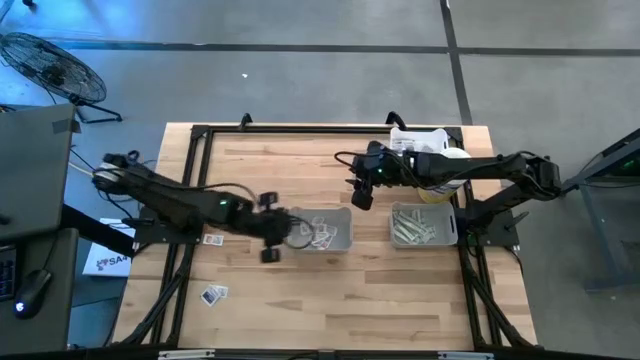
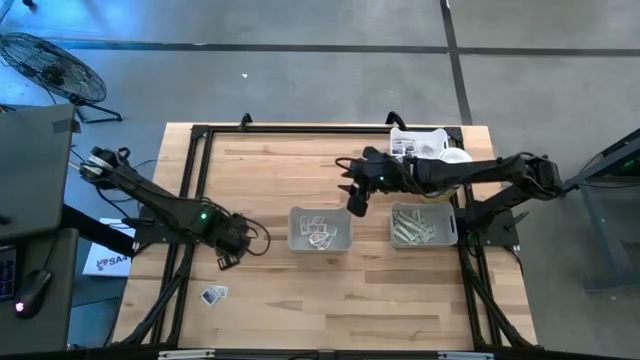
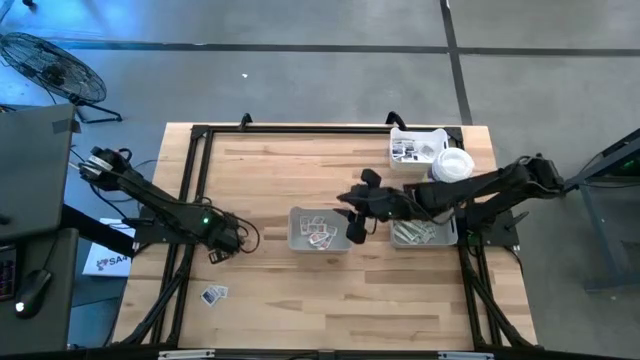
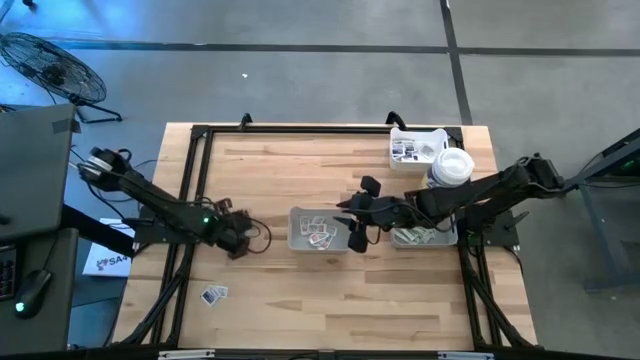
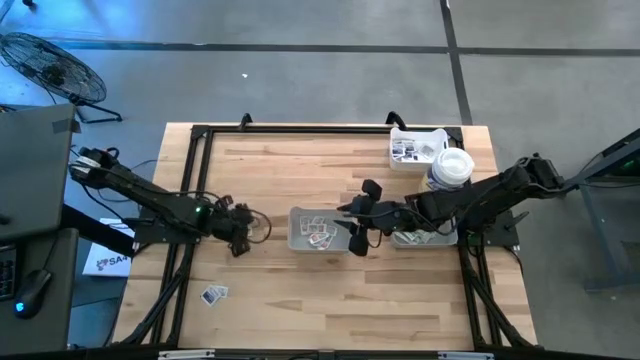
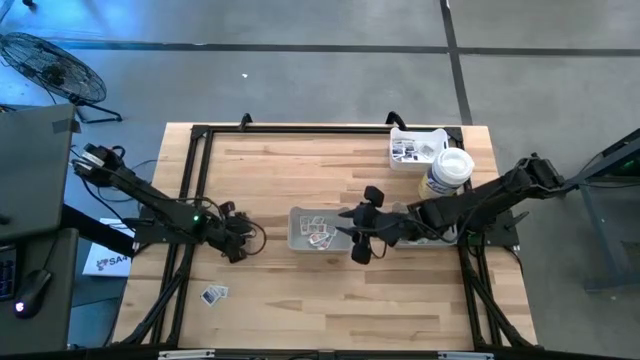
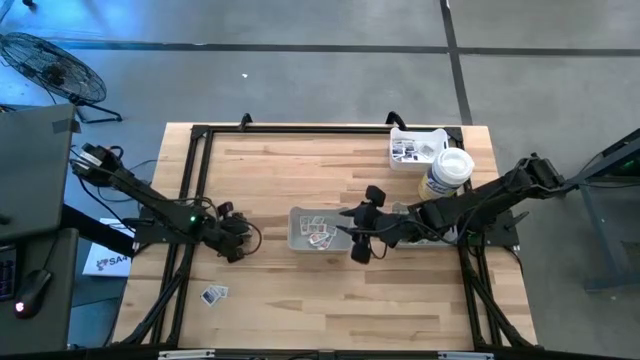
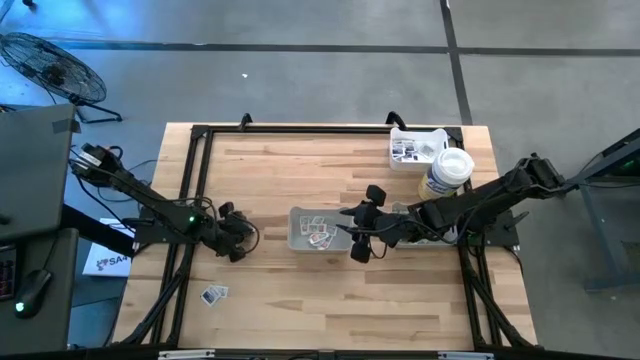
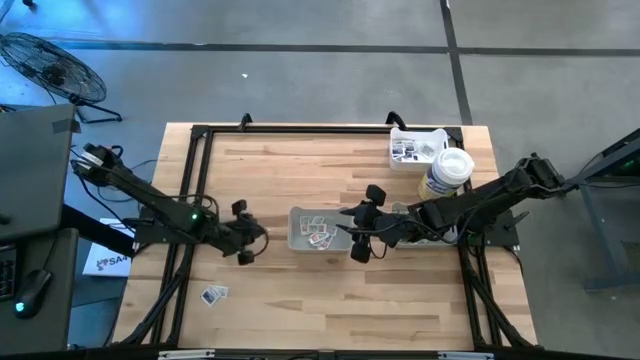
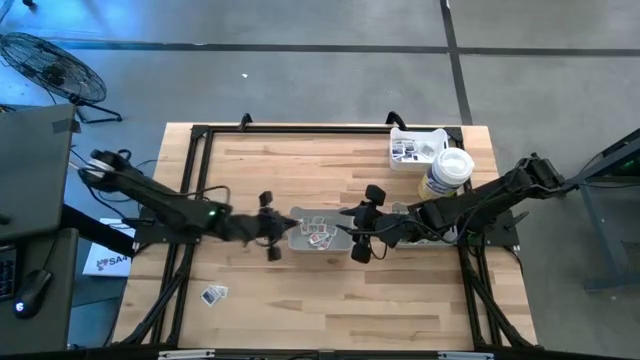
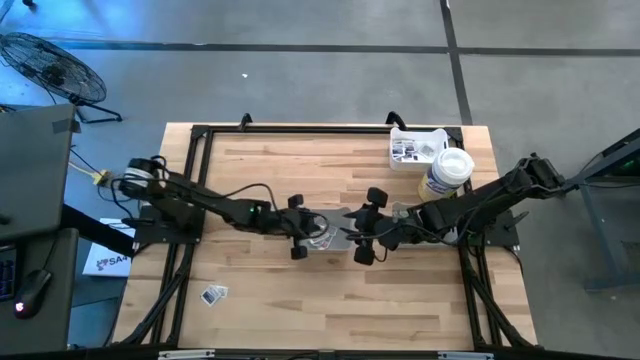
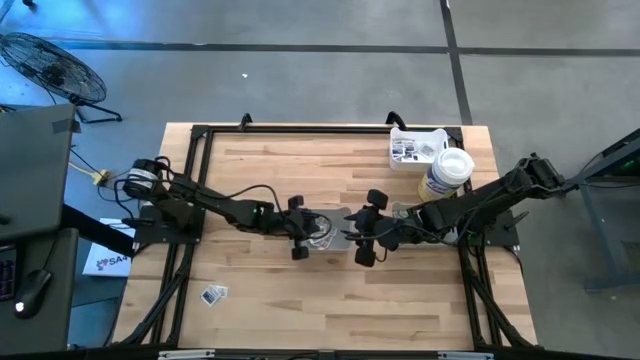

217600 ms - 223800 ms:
Task: Pick & Place First Aid Supplies
Put the orange pad into the left gray bin

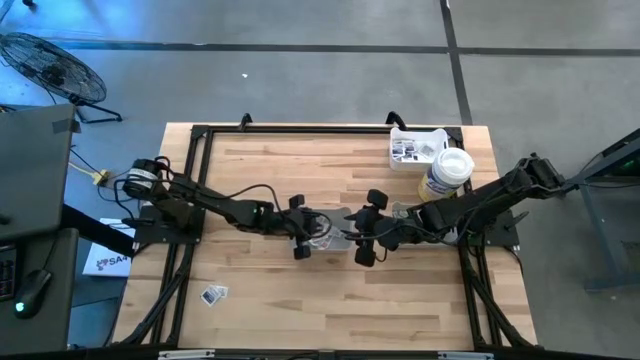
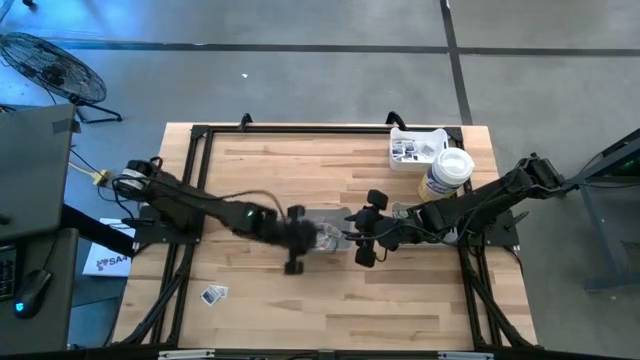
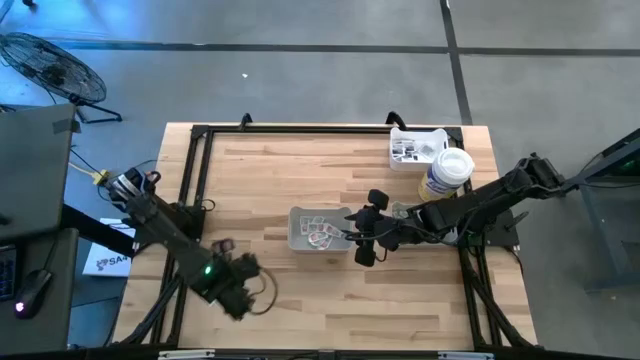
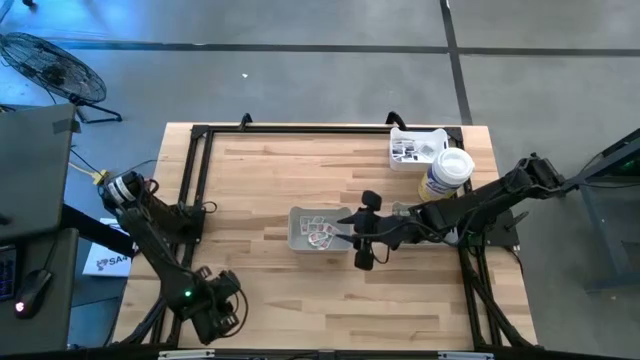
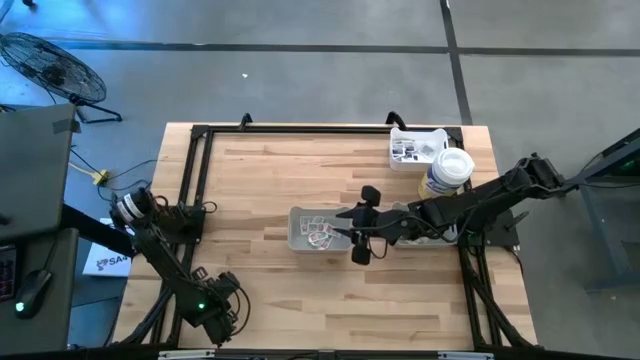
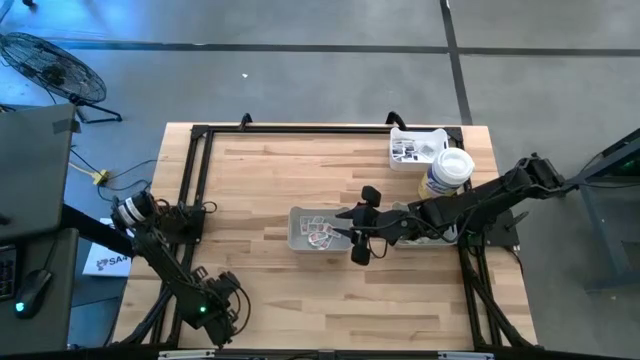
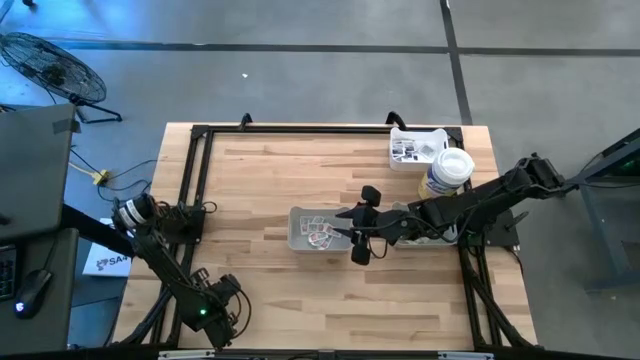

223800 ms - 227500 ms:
Put the blue pad into the white bin

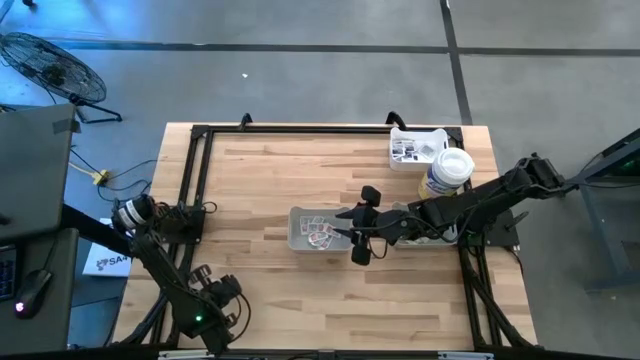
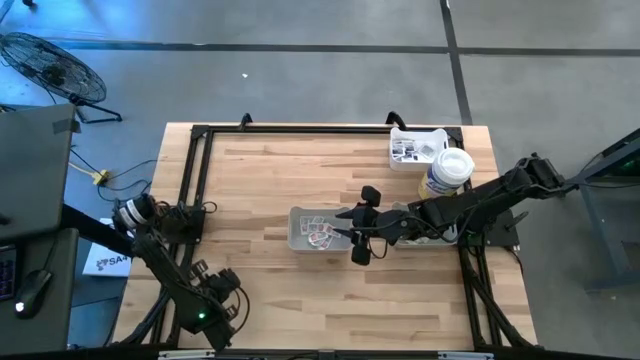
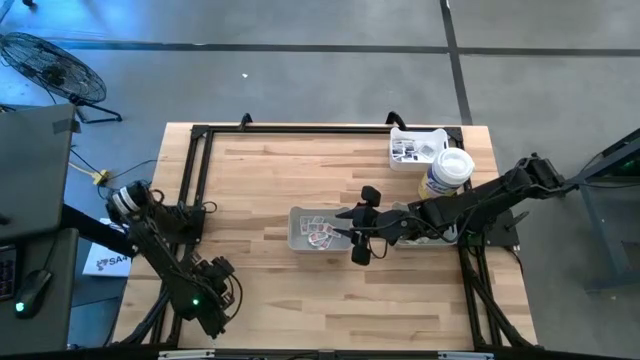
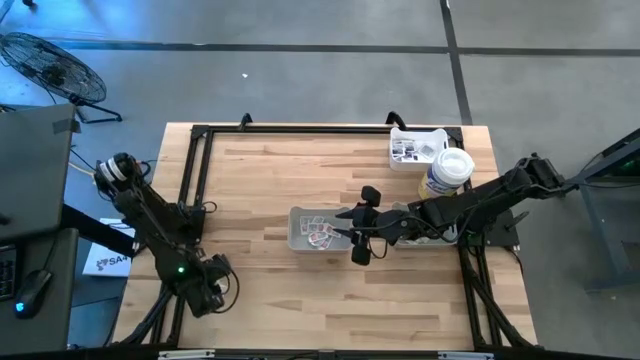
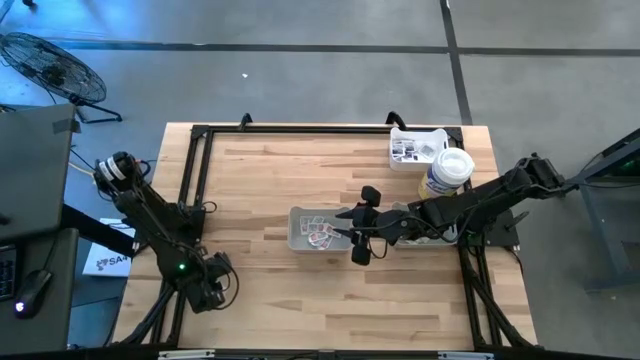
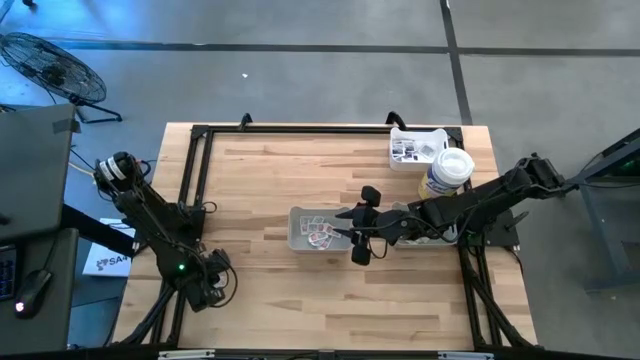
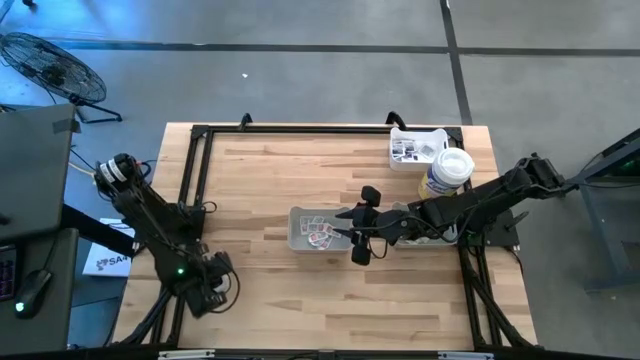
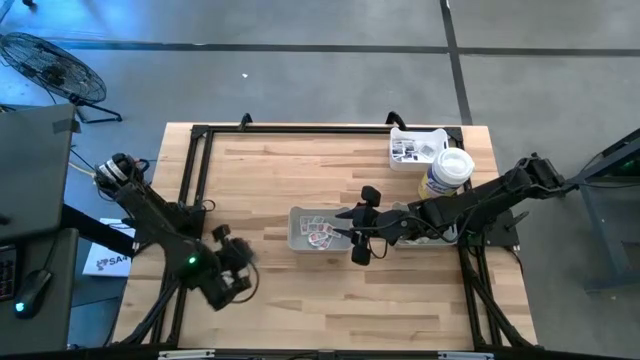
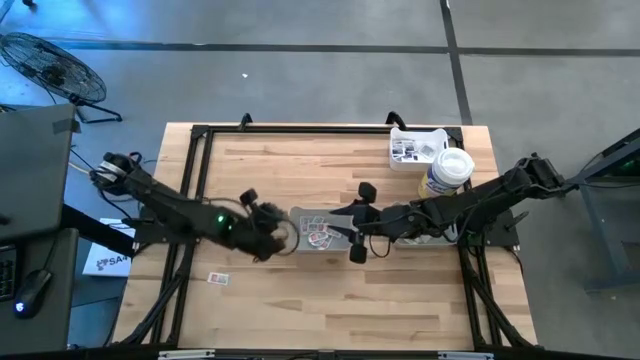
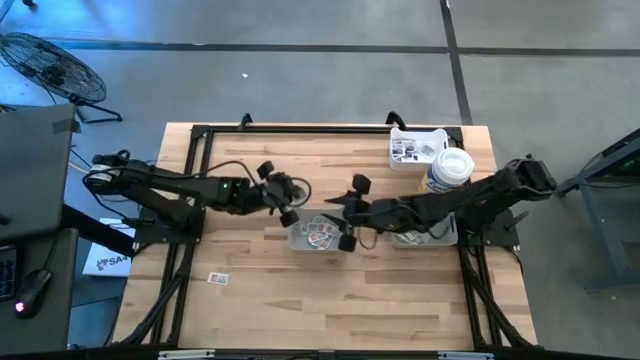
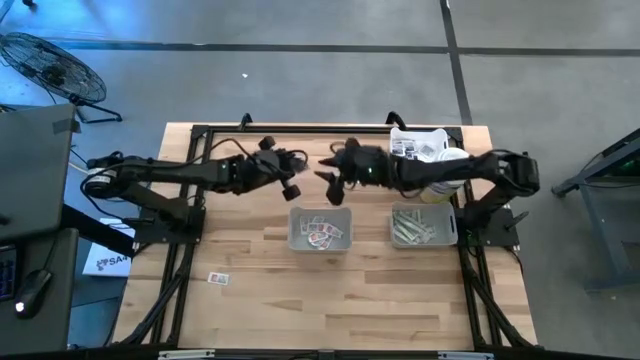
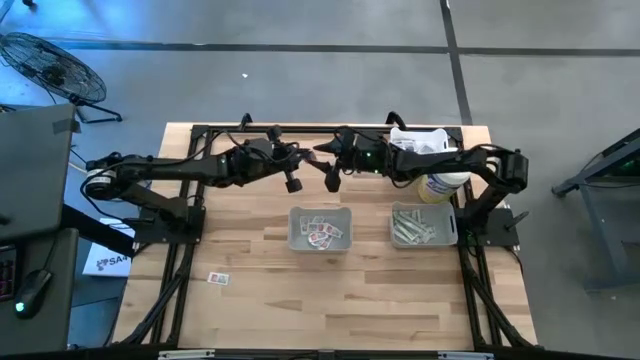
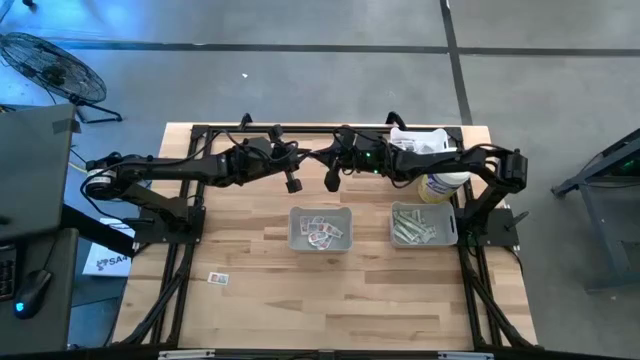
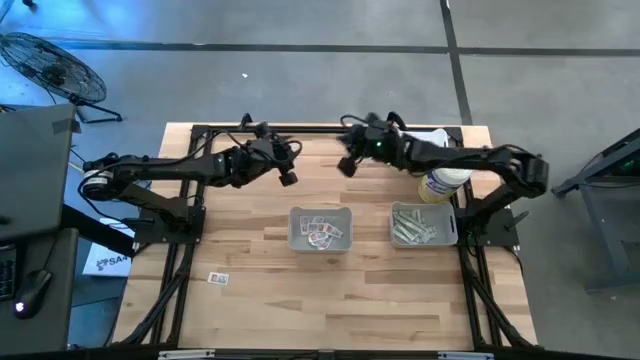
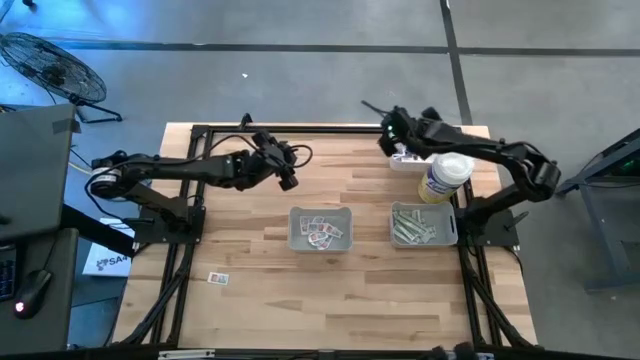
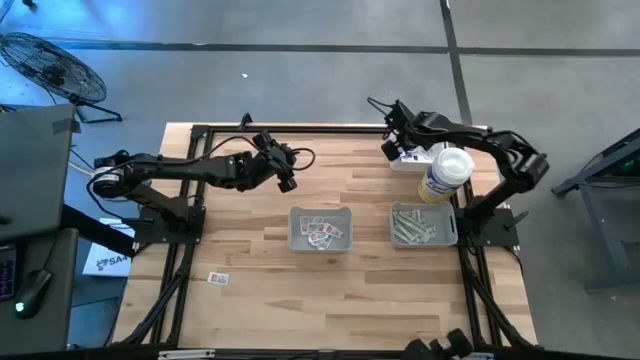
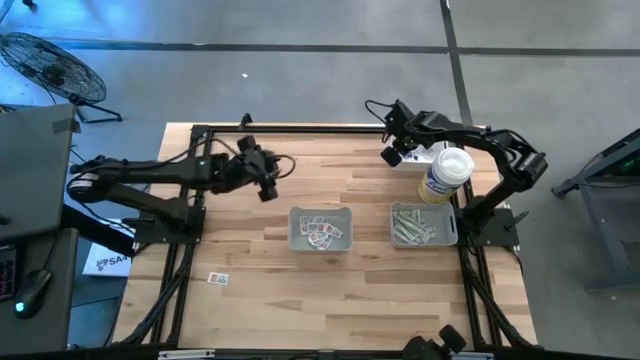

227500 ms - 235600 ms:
Put the blue pad into the white bin

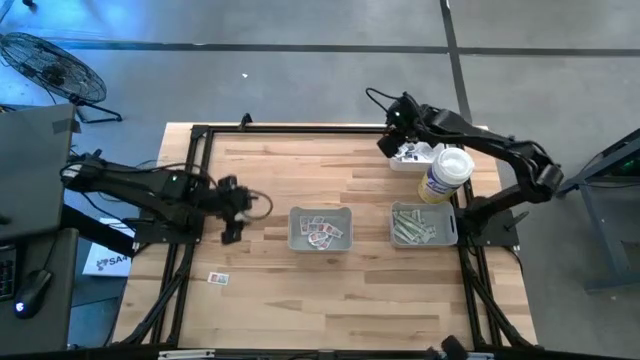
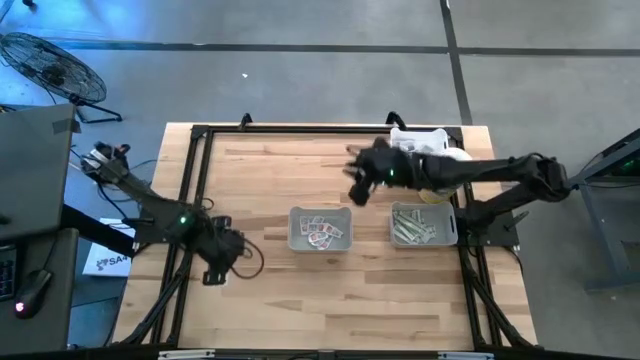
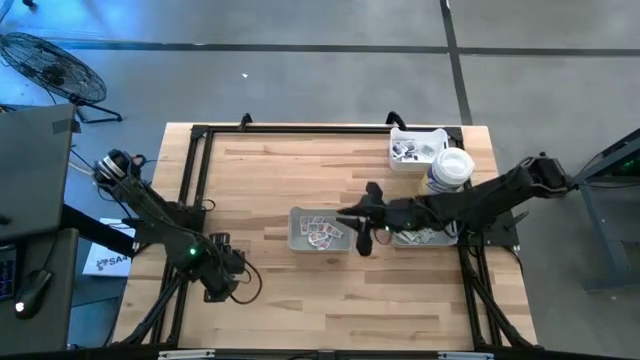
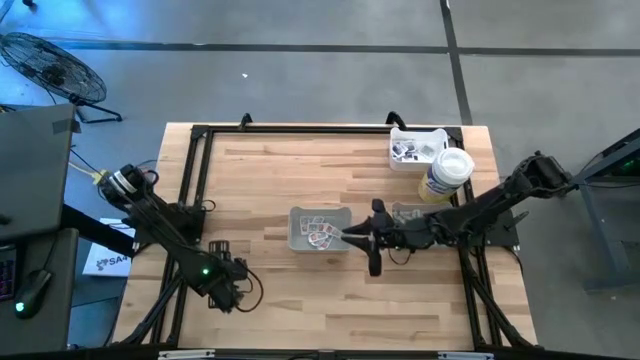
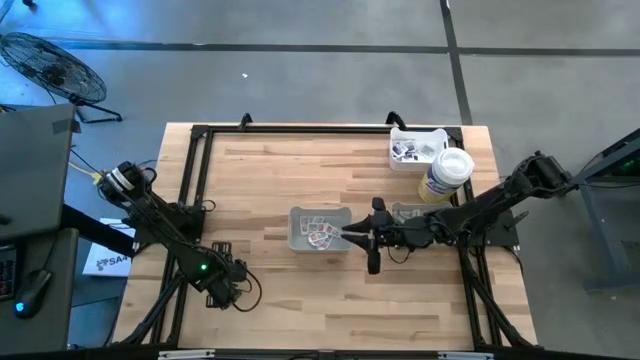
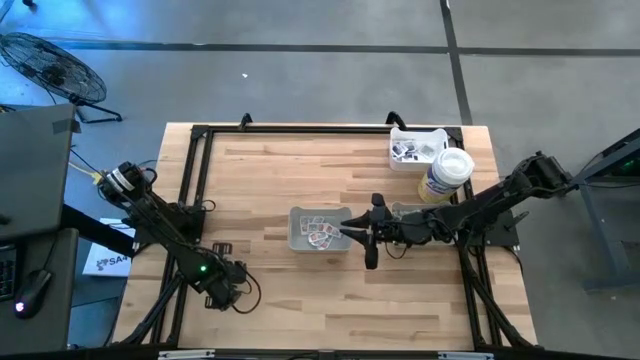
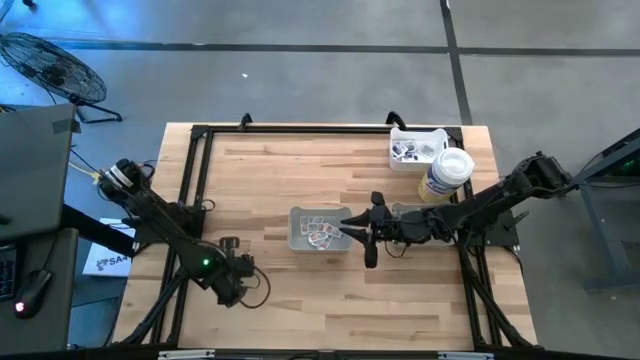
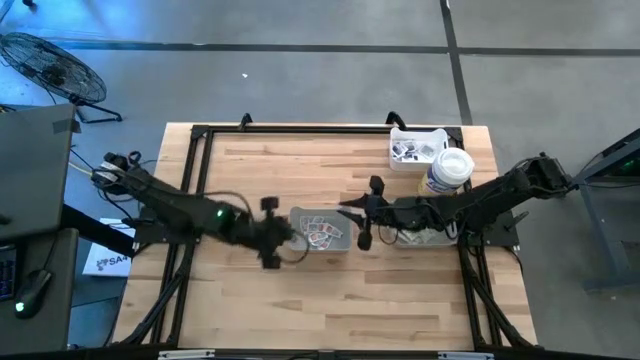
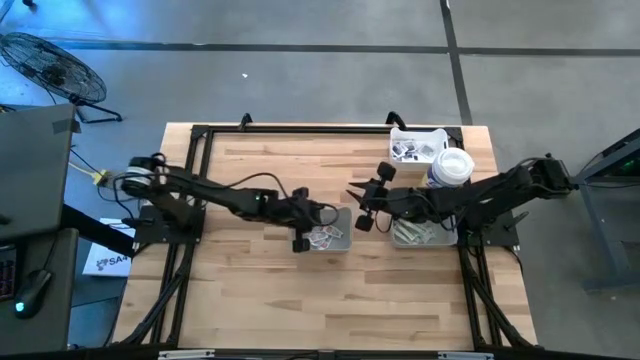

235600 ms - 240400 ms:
Put the orange pad into the left gray bin
